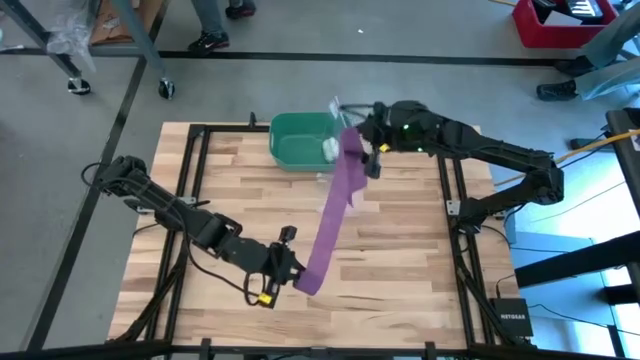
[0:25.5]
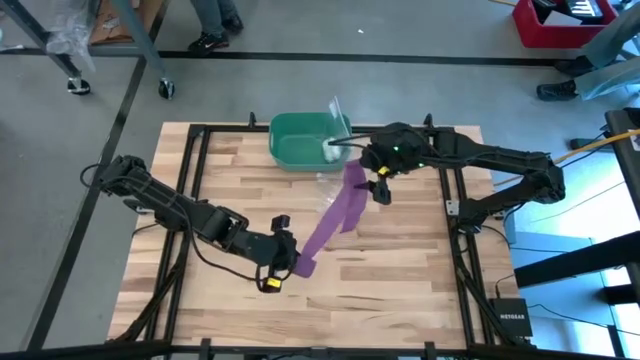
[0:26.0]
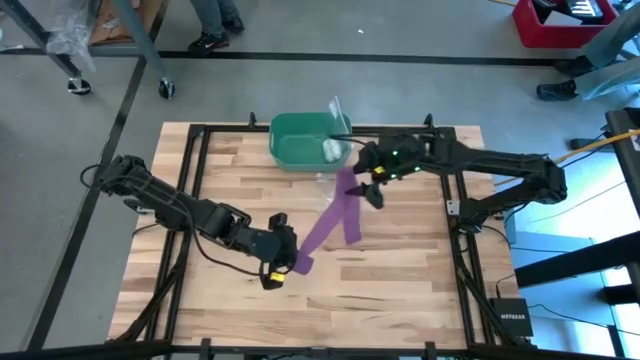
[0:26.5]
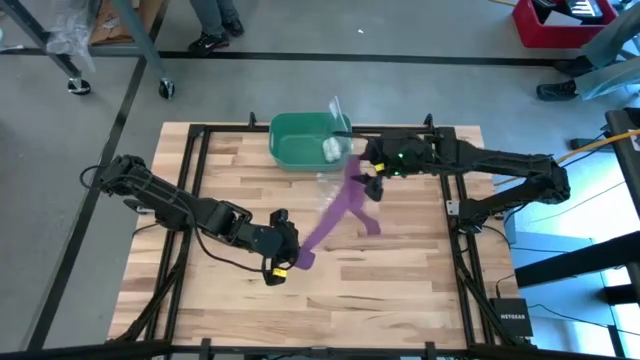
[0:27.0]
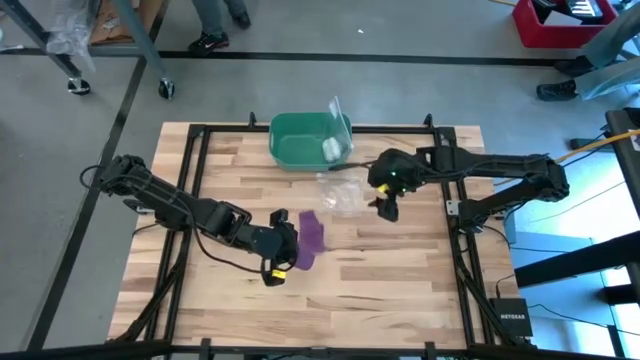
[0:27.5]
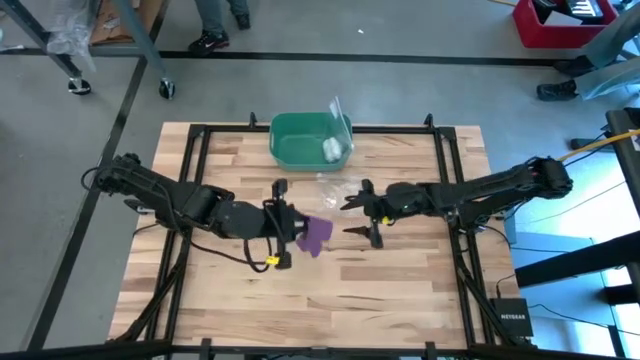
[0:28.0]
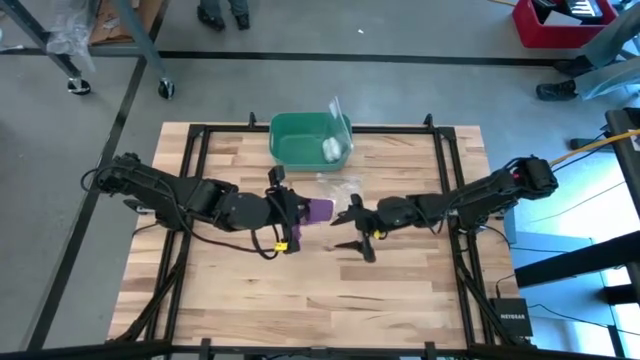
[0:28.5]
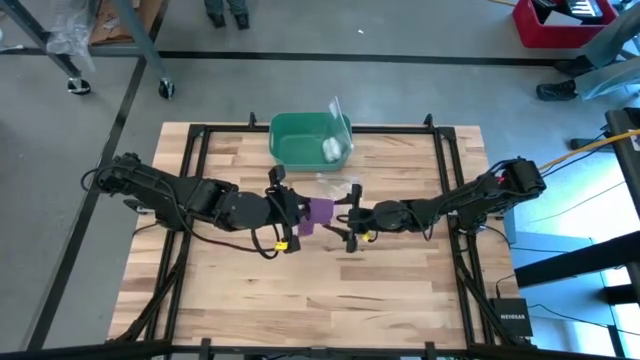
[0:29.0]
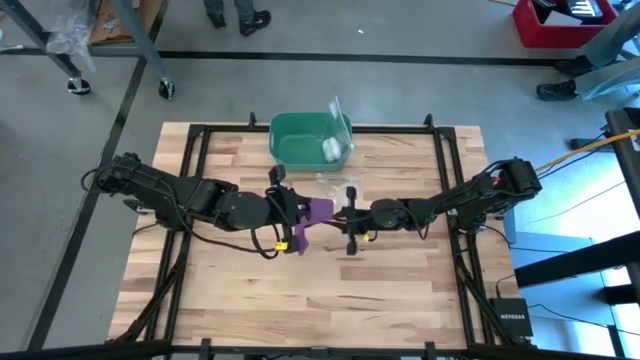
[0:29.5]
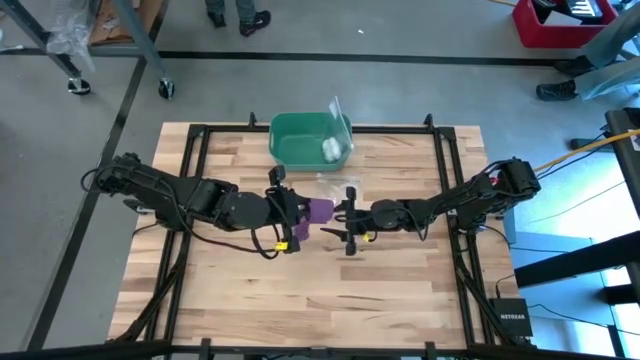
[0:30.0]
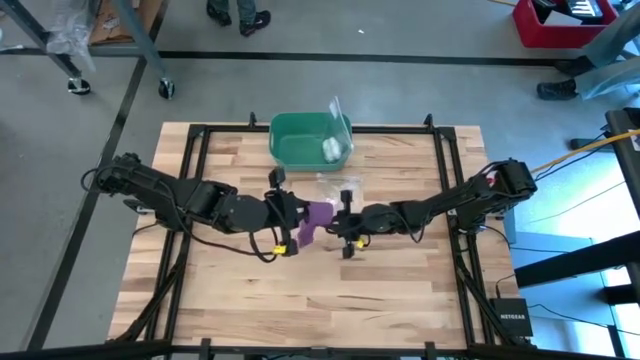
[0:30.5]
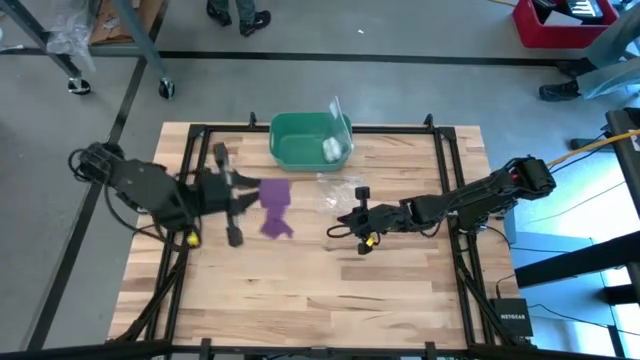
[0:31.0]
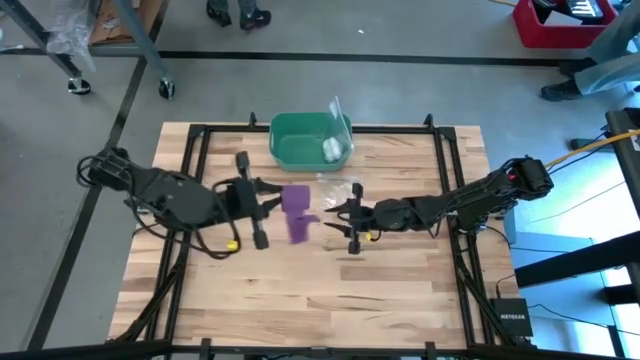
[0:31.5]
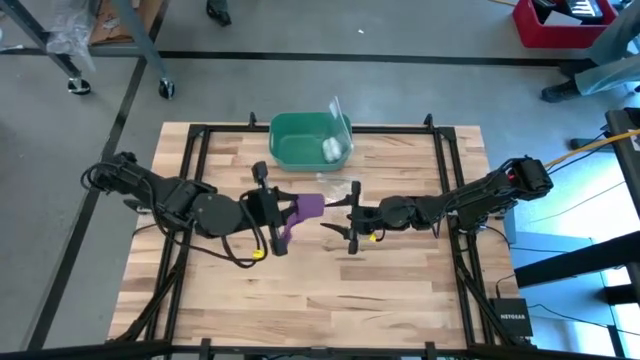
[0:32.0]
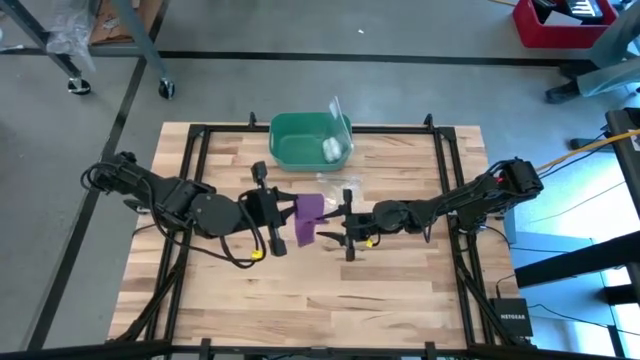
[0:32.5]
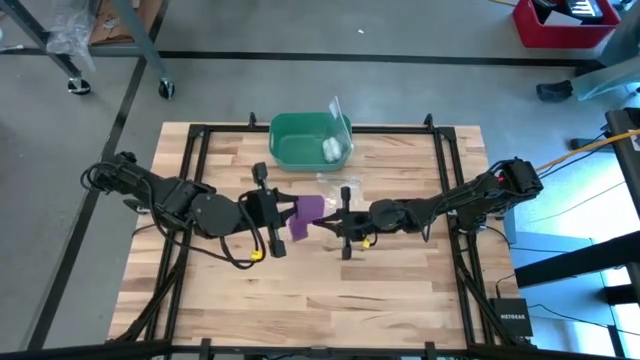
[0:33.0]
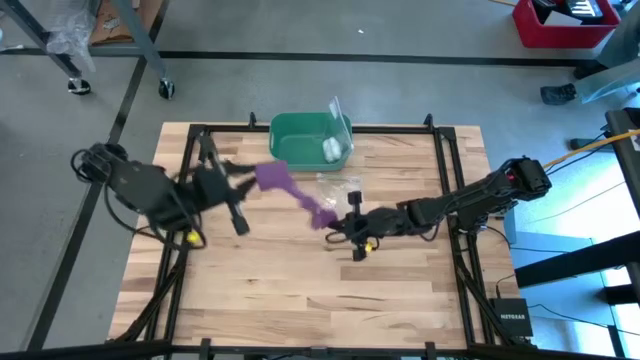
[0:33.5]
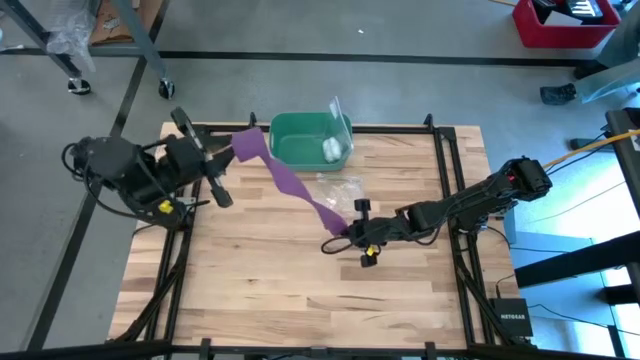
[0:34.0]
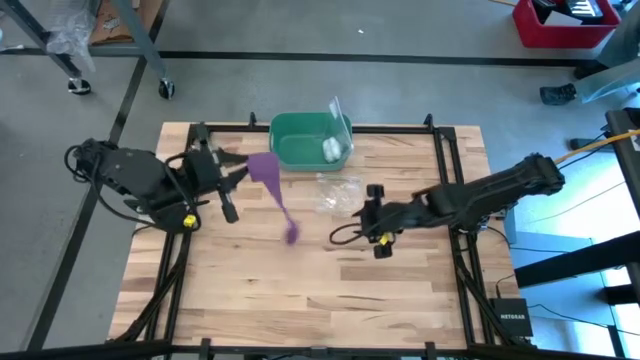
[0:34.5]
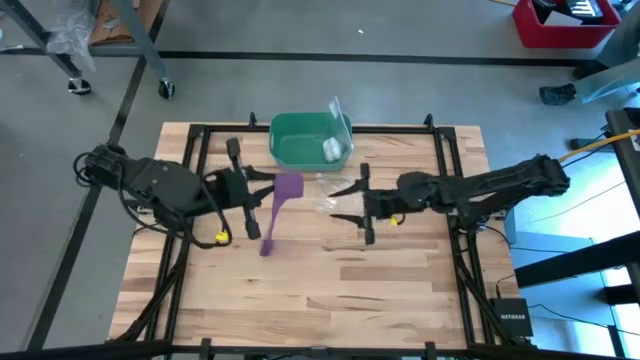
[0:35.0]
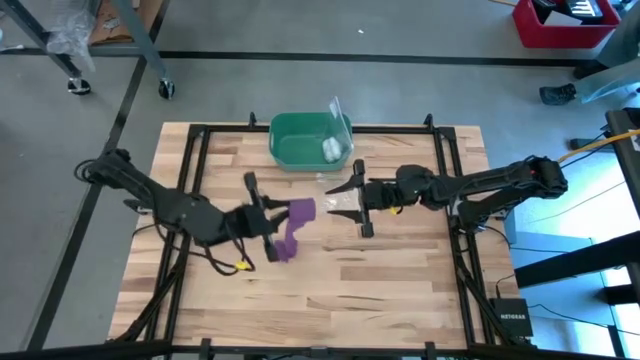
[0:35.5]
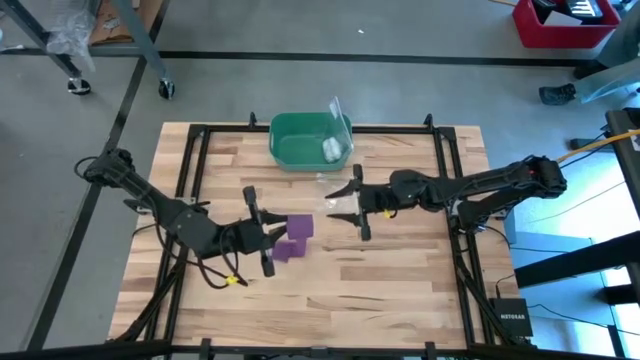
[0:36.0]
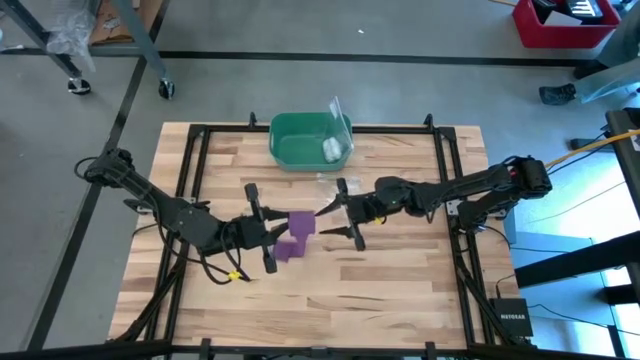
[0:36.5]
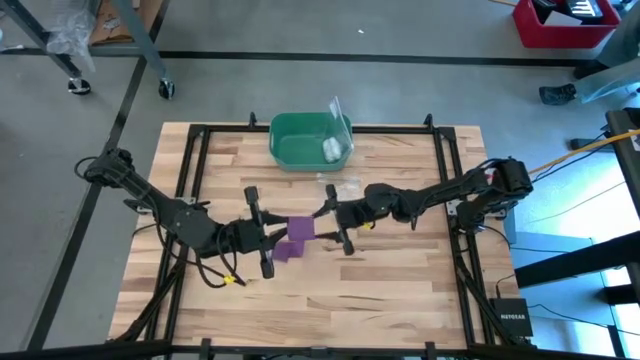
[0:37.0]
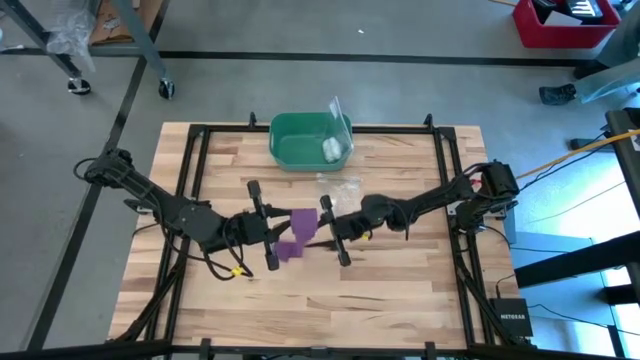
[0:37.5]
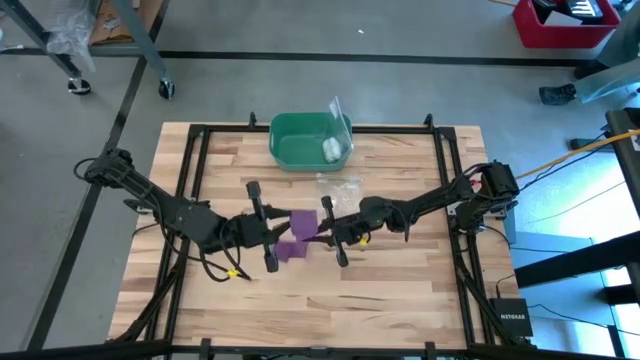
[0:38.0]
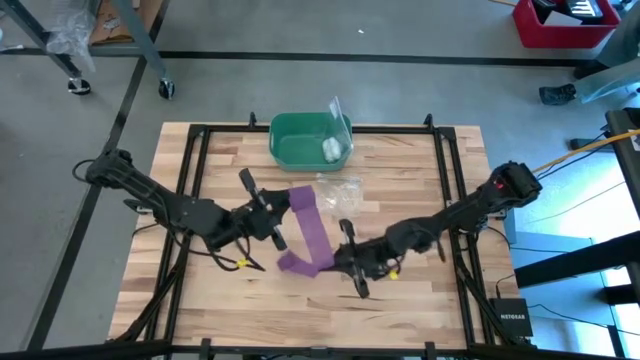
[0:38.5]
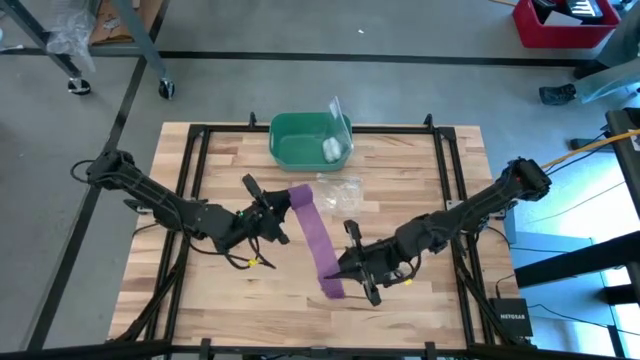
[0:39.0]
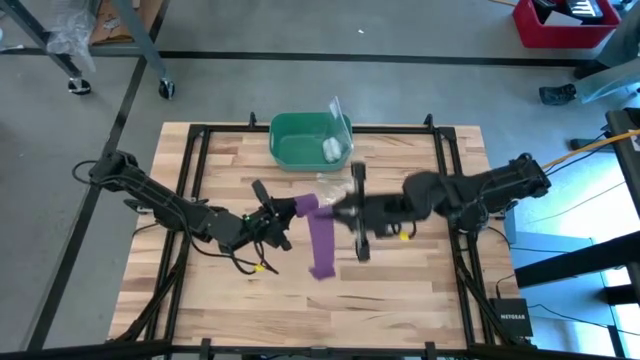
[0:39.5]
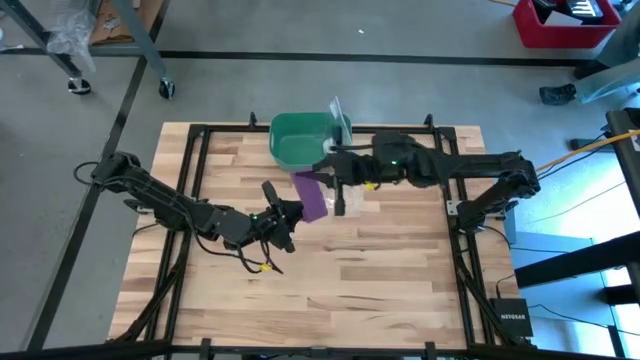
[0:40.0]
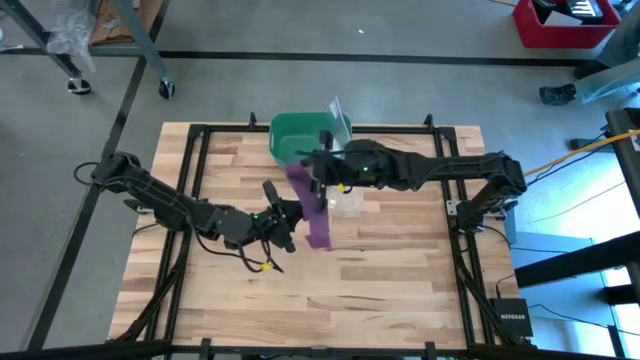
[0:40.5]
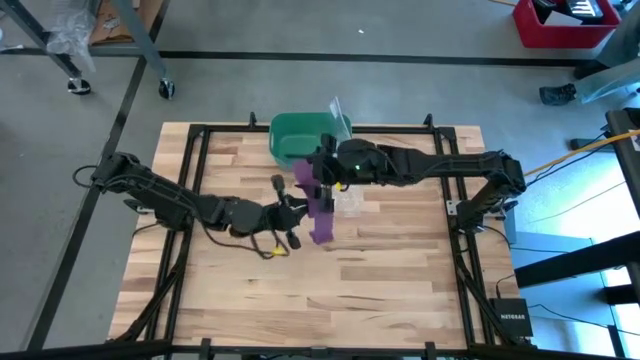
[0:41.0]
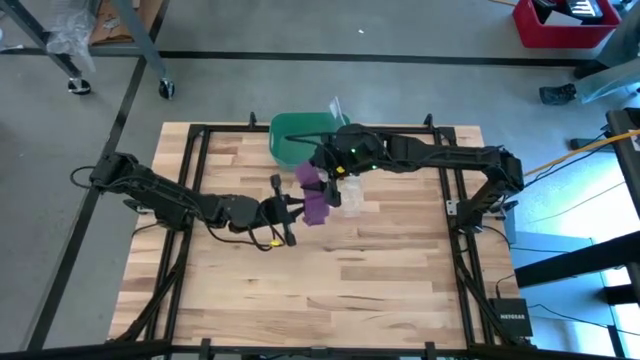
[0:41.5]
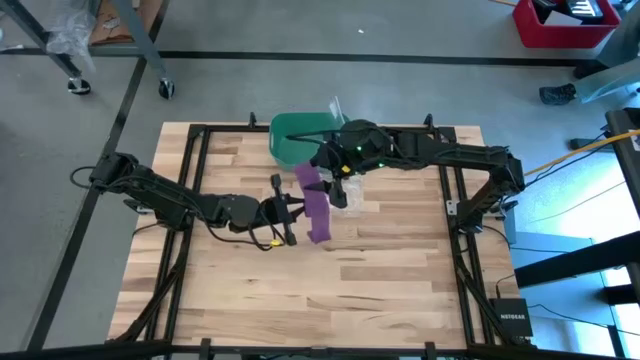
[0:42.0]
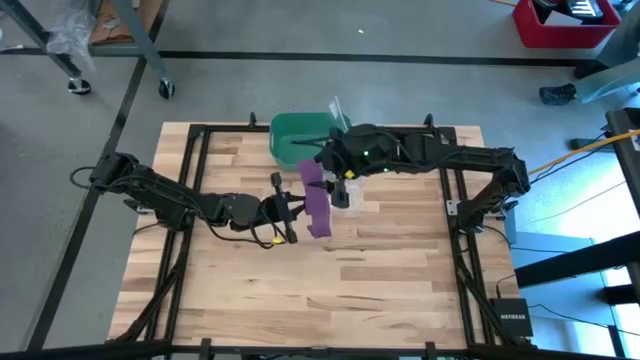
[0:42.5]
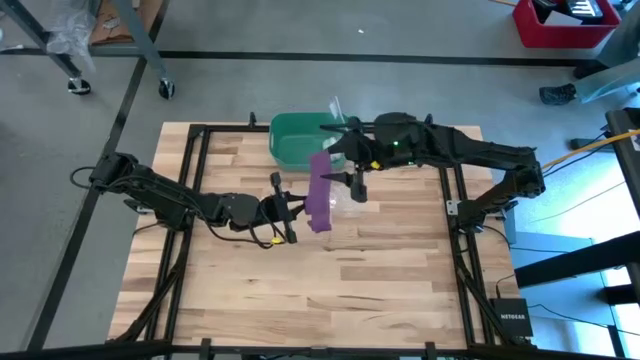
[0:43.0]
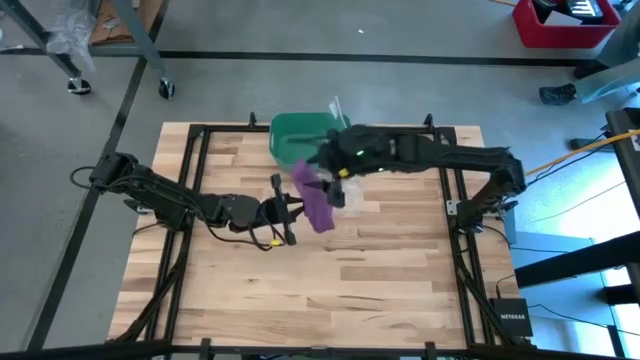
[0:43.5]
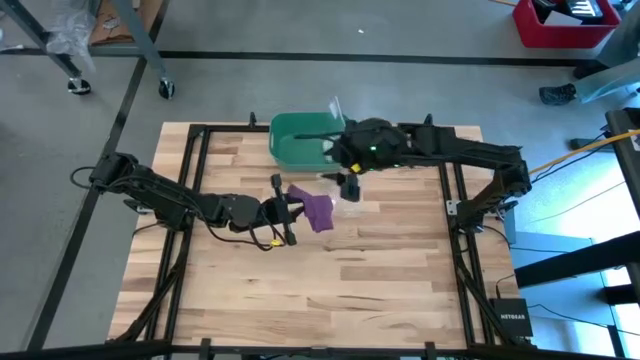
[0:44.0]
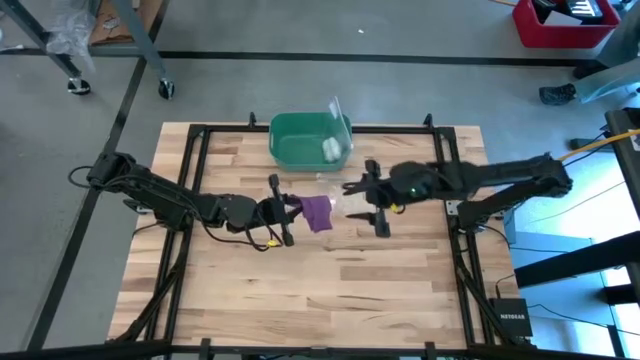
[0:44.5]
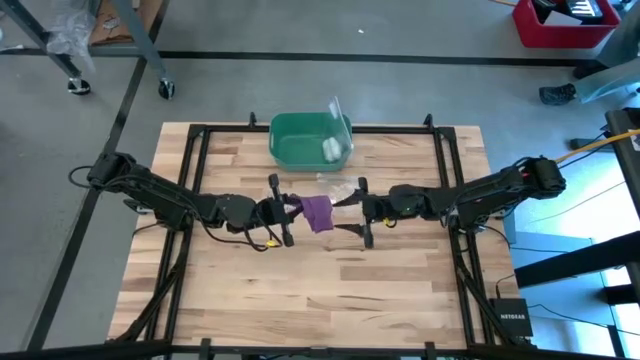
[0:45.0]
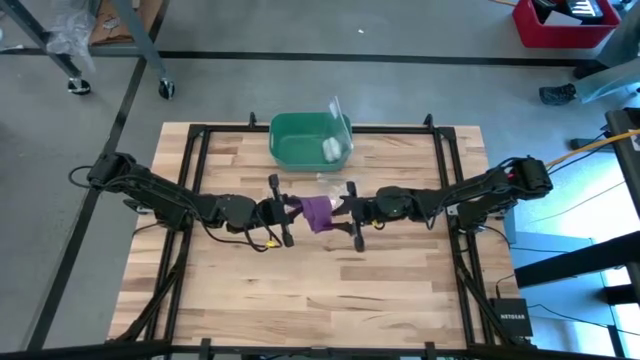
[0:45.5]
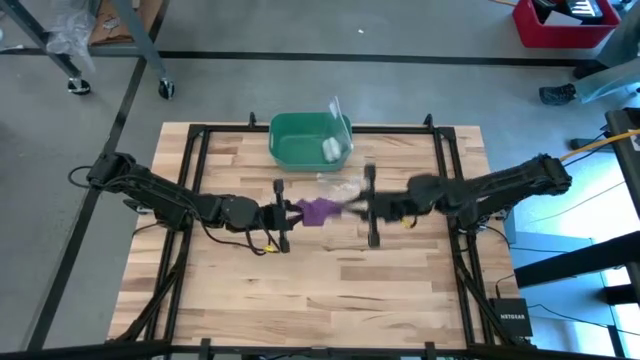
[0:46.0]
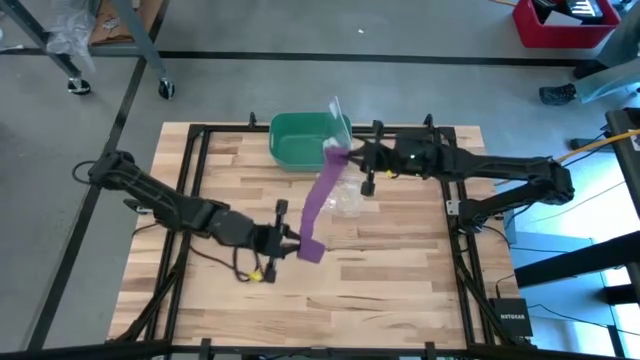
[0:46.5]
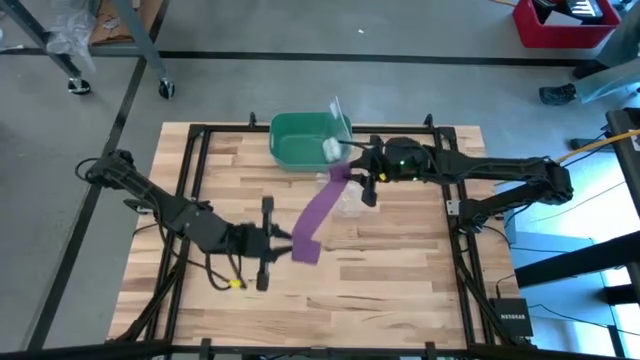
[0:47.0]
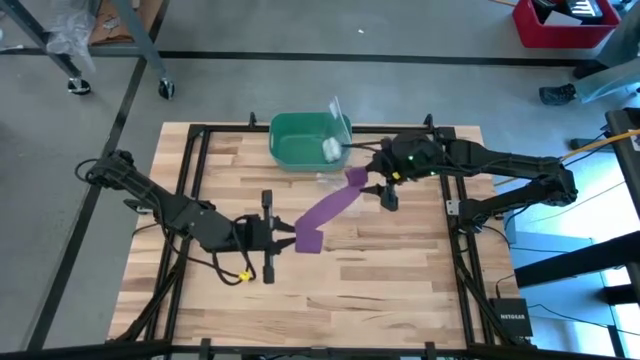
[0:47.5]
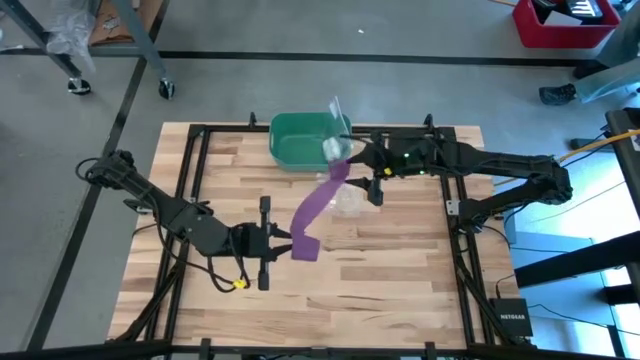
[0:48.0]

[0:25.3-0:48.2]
Task: Roll bandage
Roll the violet bandage
